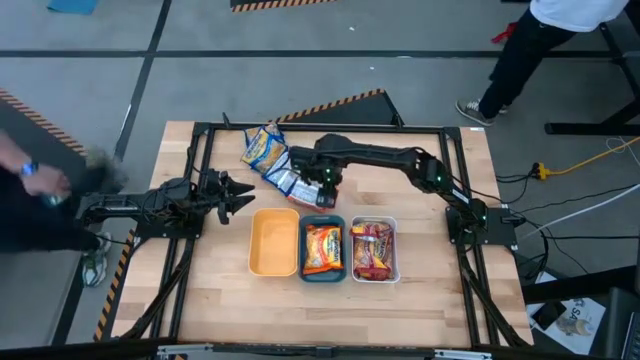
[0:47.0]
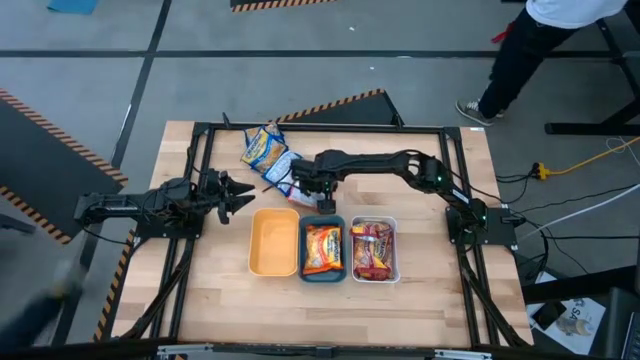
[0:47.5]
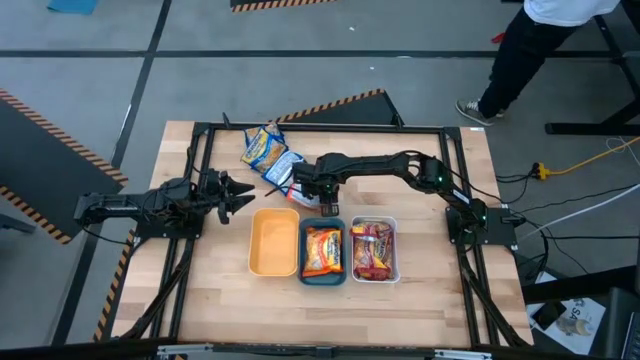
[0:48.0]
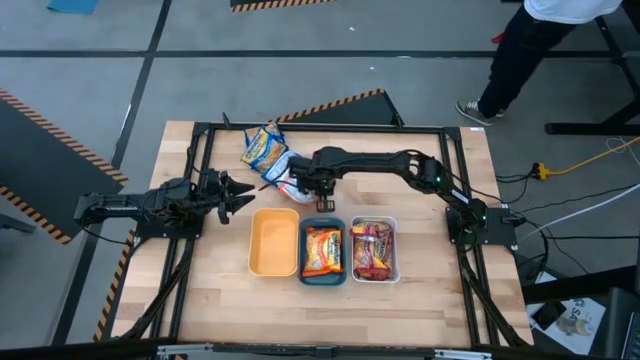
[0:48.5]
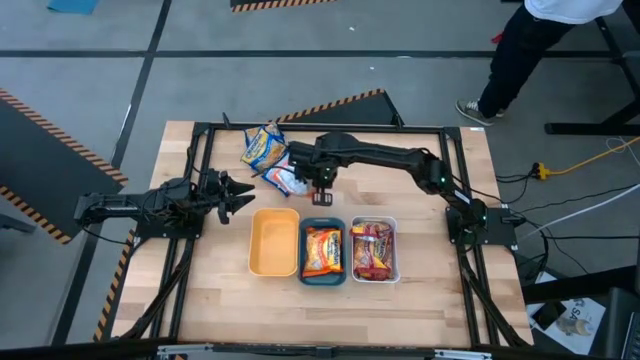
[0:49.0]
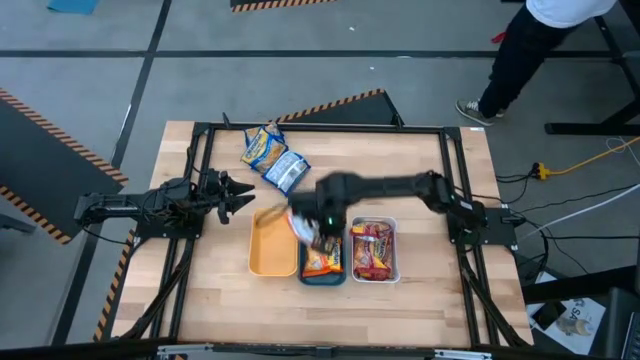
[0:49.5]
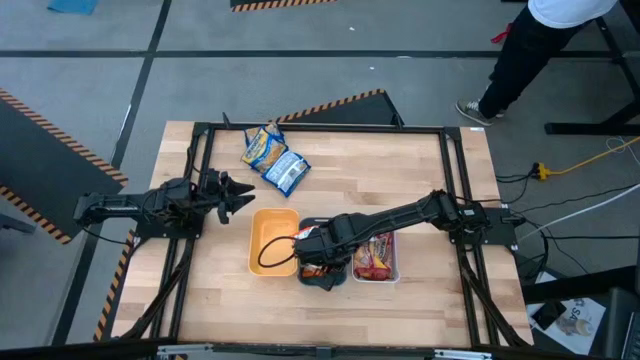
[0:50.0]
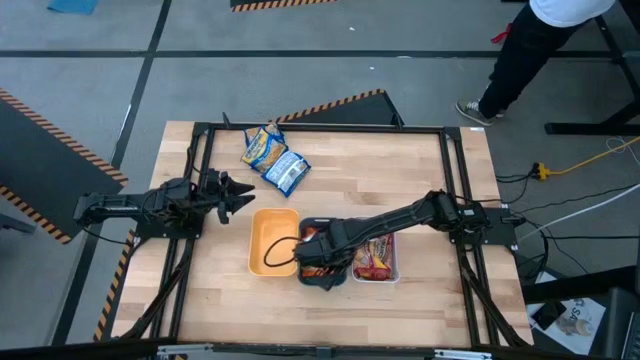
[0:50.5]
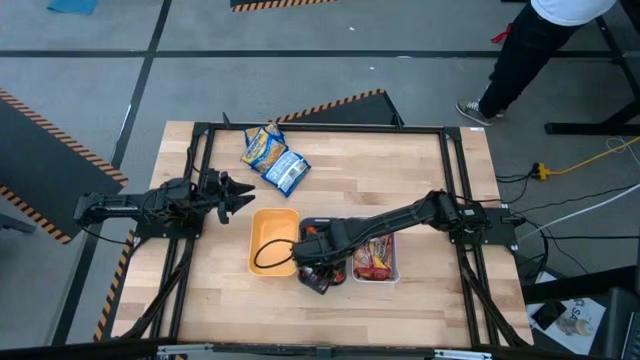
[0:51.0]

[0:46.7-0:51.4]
Task: Sort Maruchan noodles
Put the orange noodle pack into the blue bin

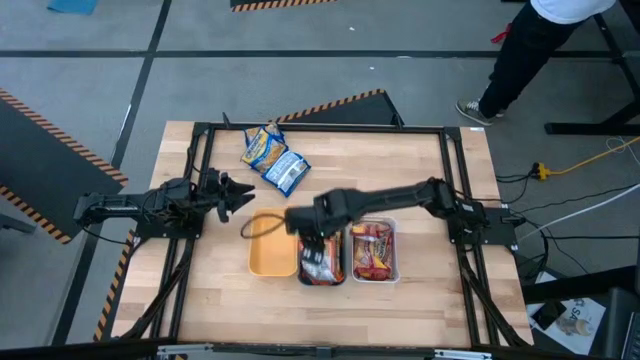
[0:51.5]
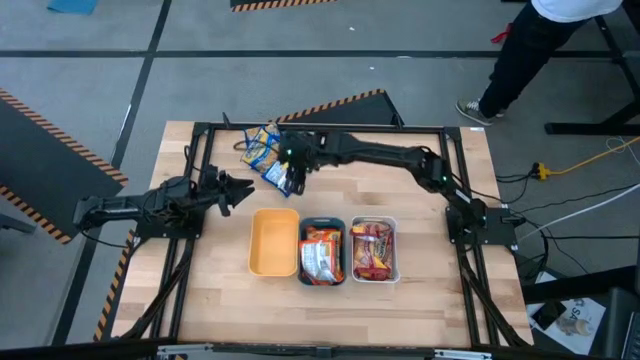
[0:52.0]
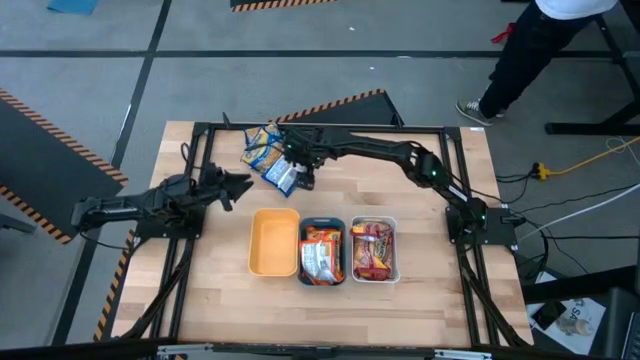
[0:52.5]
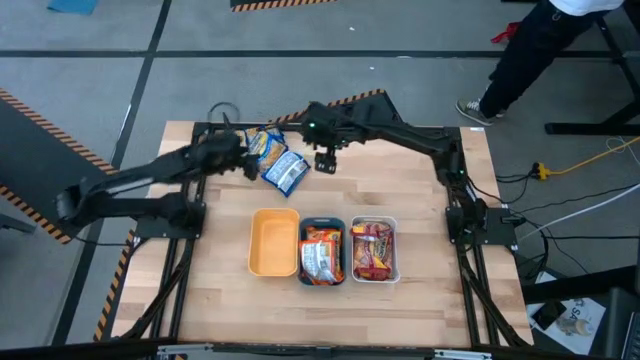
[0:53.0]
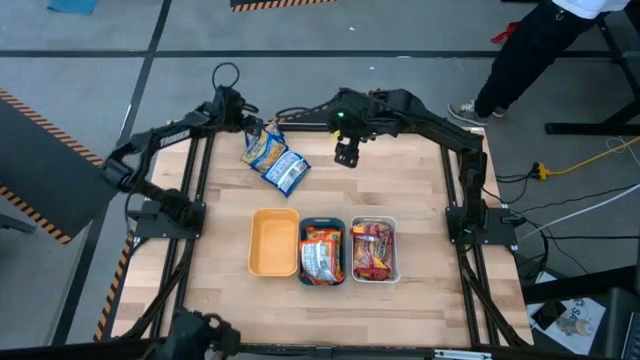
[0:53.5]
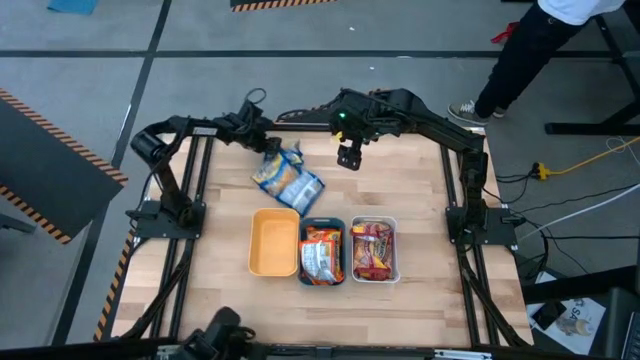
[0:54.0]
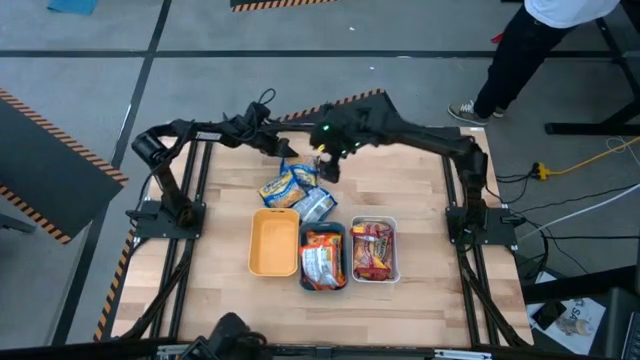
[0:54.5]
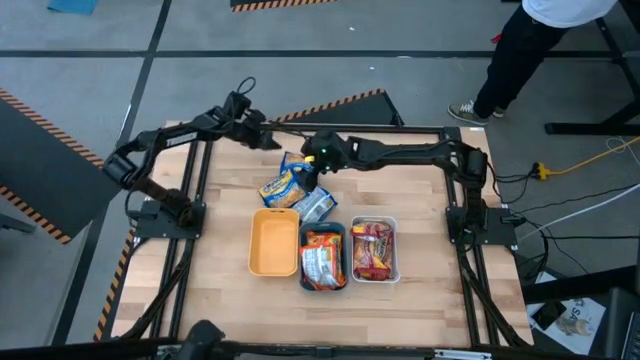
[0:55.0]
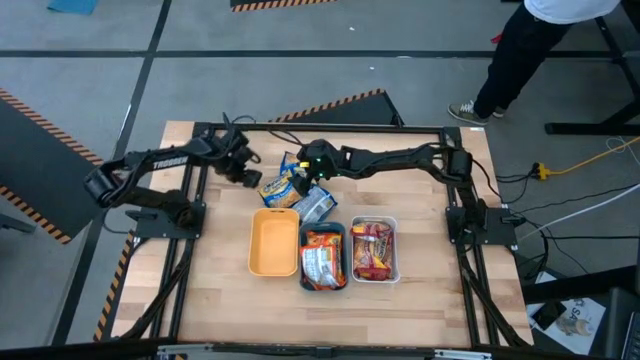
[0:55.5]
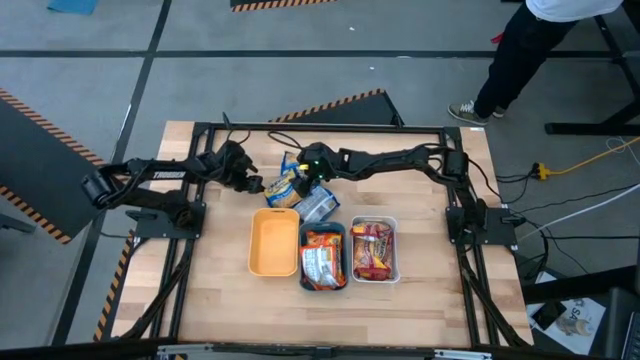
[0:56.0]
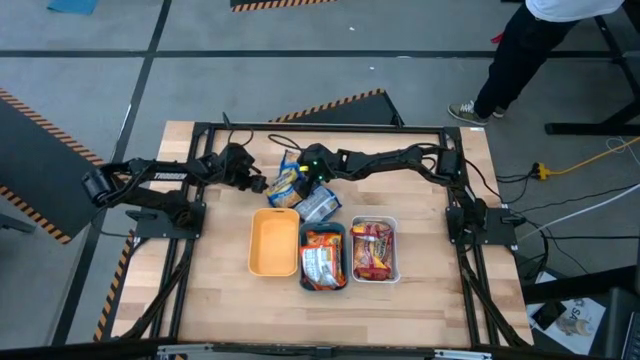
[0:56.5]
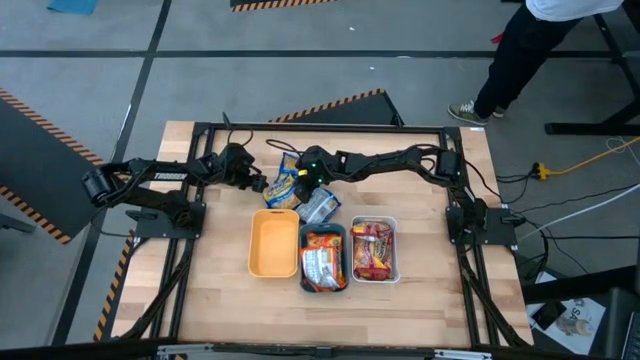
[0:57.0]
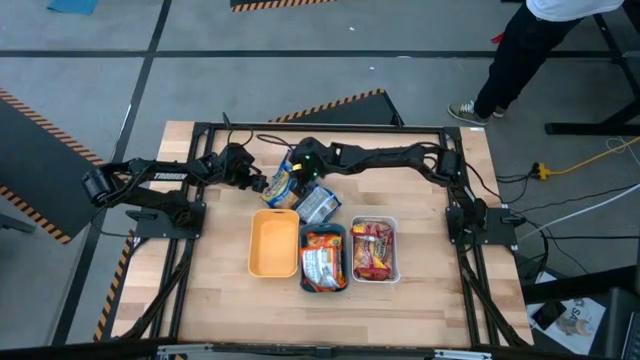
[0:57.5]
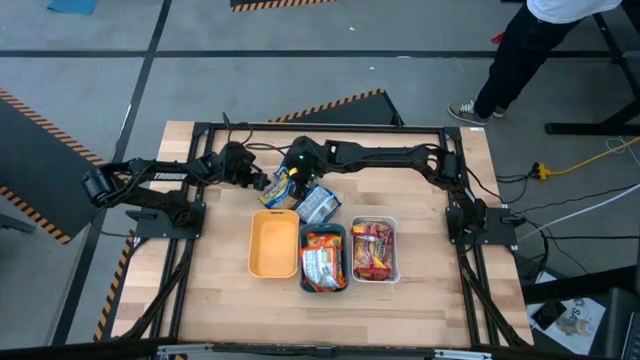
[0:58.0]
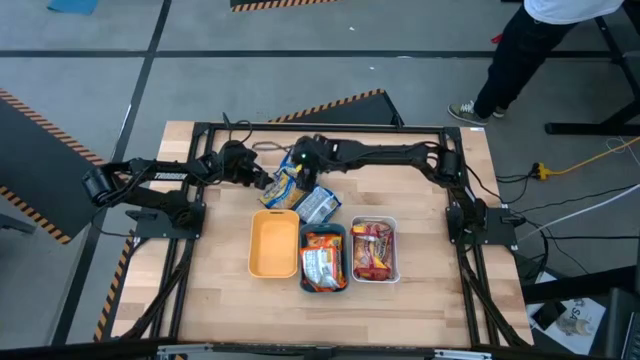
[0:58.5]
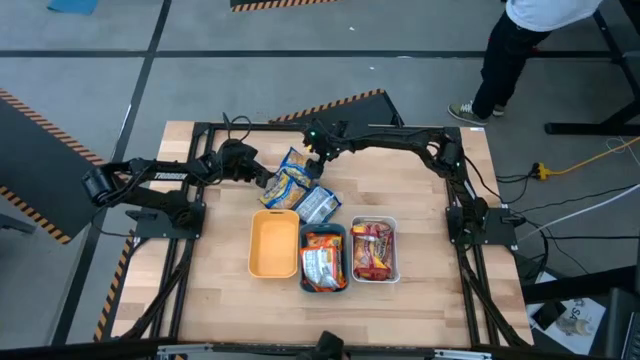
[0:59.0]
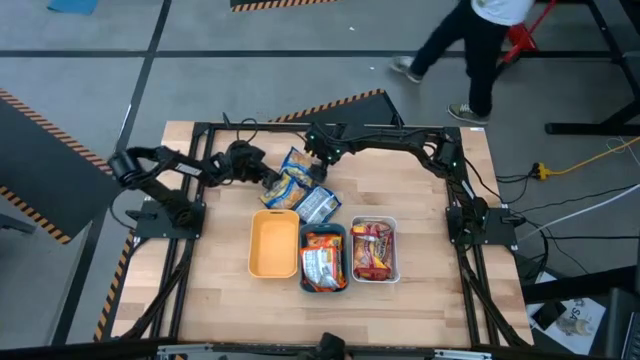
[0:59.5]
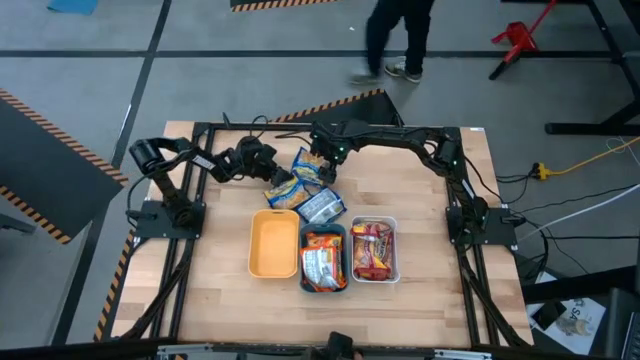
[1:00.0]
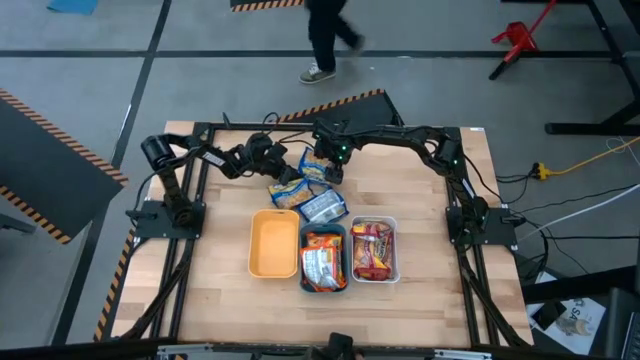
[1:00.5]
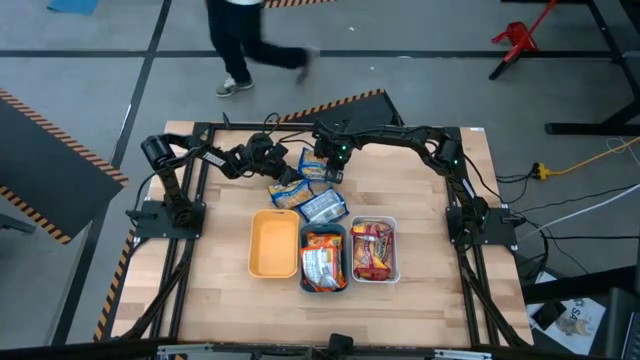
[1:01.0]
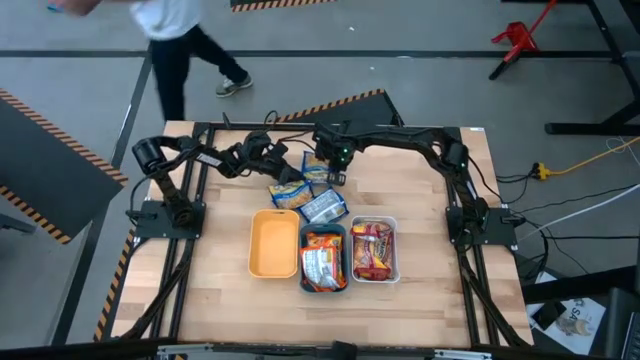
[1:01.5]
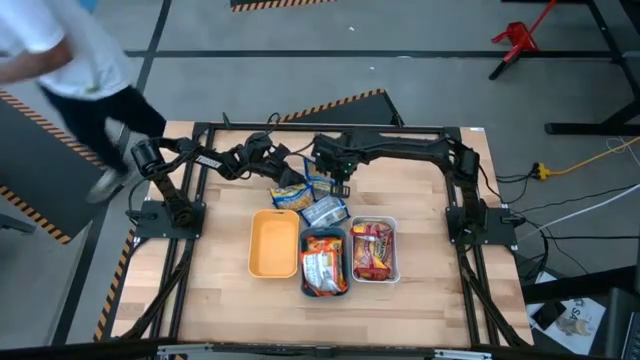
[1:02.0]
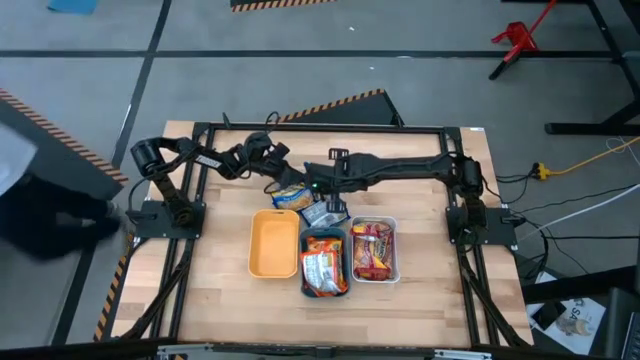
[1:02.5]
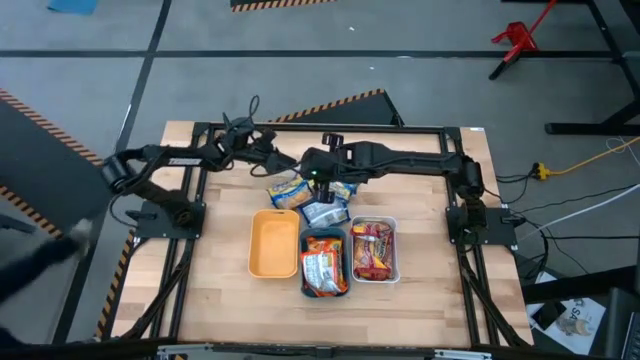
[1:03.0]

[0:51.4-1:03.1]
Put the top blue noodle pack into the yellow bin

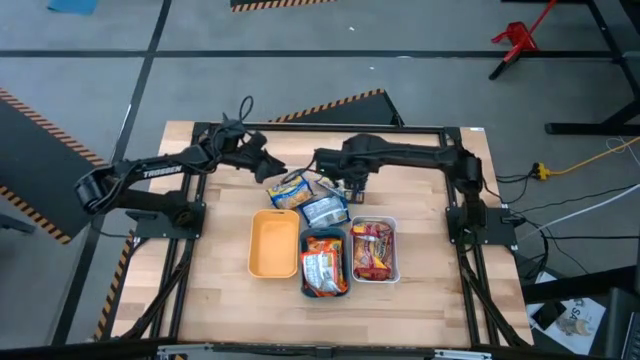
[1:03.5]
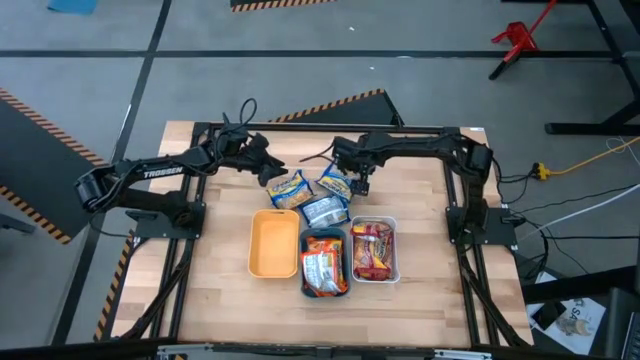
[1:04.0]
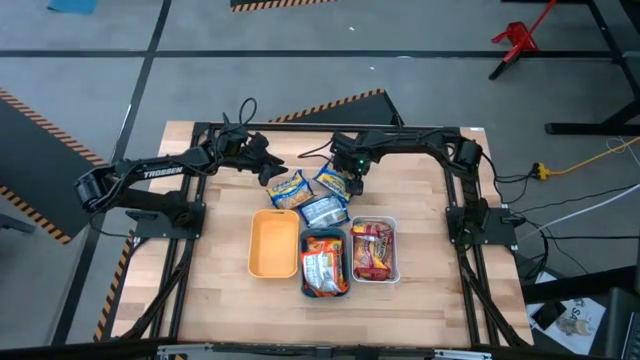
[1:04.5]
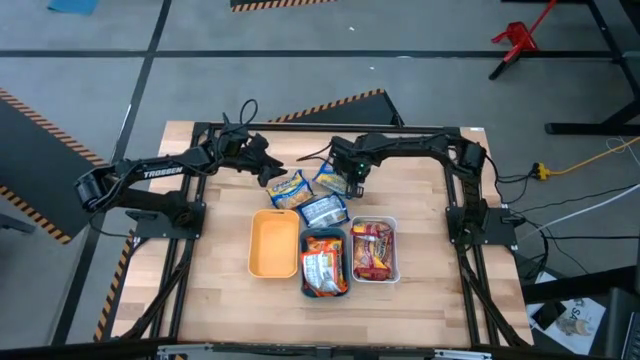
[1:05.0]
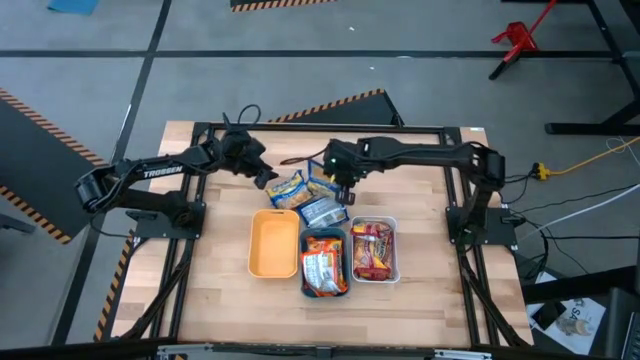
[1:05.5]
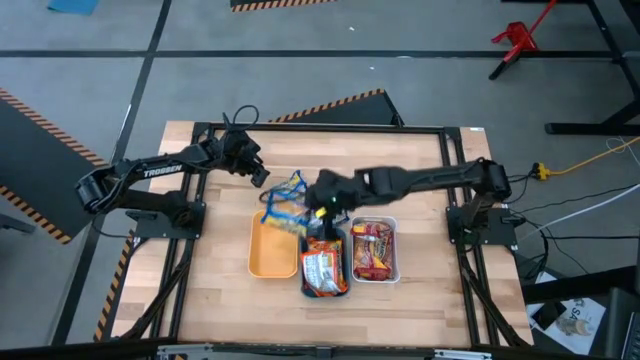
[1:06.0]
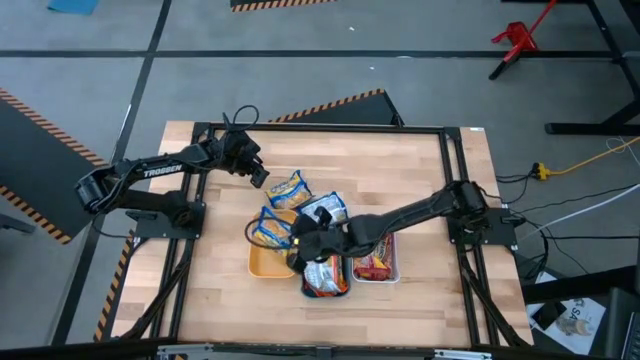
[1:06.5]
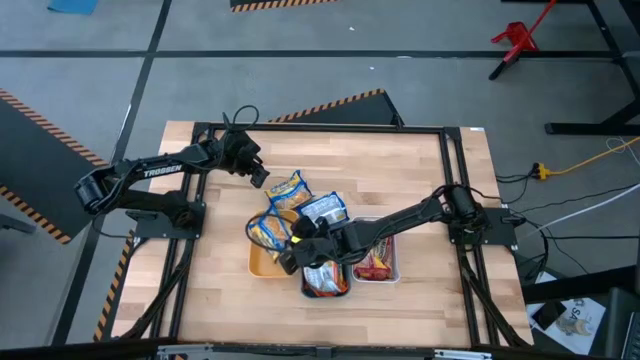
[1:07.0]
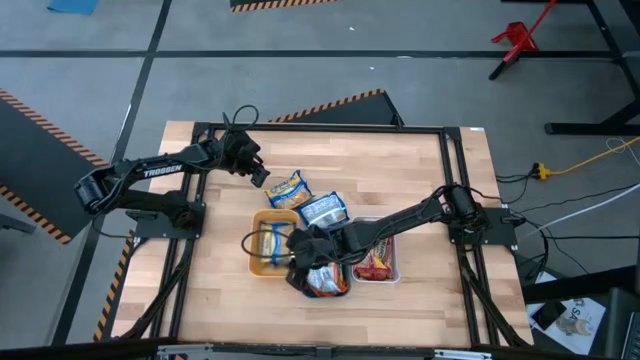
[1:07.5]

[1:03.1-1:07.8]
Put the top blue noodle pack into the yellow bin

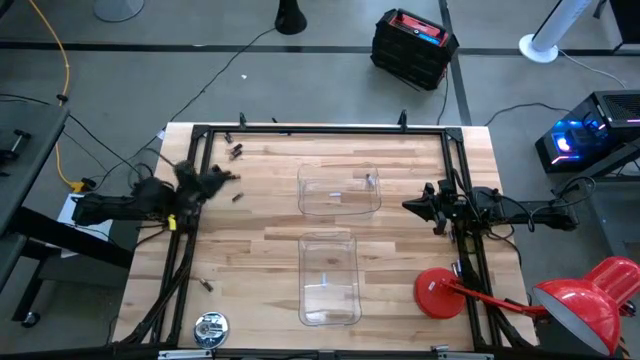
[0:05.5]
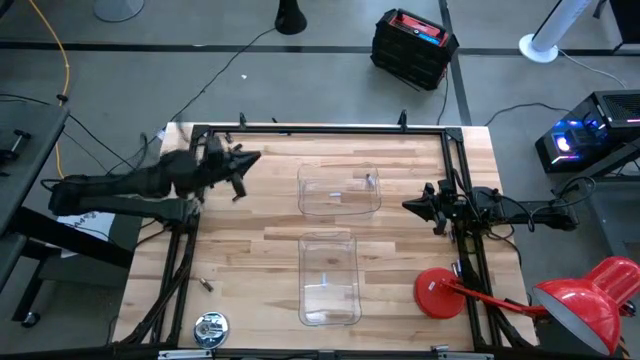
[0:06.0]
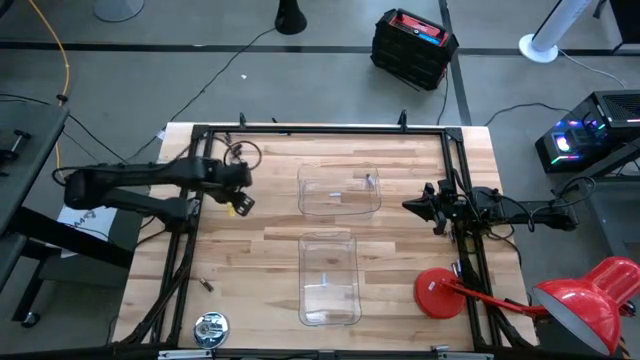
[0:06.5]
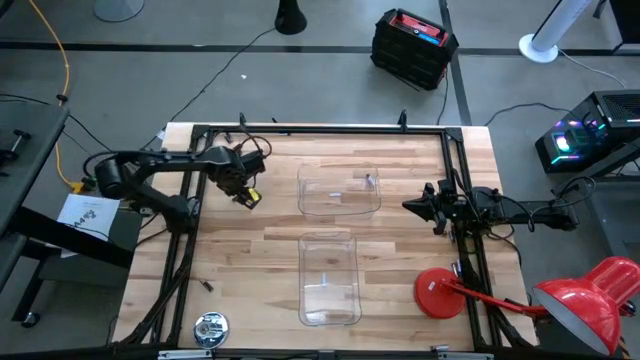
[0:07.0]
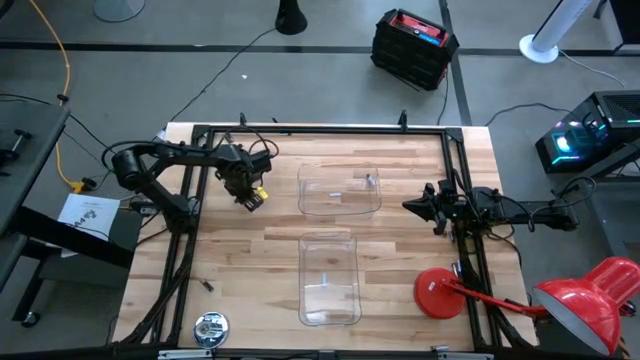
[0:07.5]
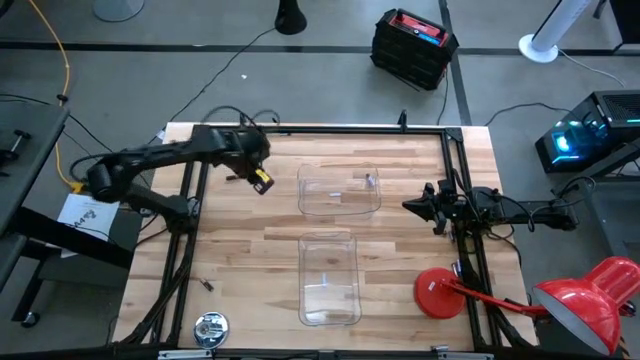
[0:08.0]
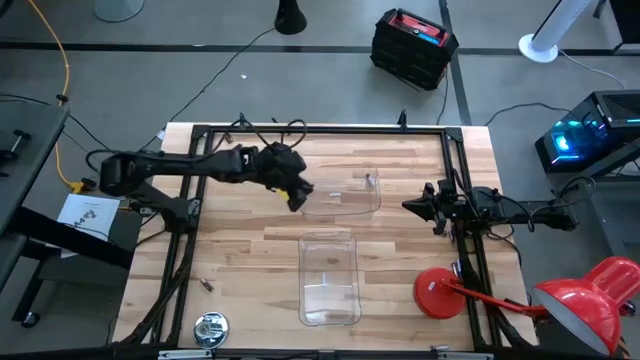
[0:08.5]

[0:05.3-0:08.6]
Task: Sort batteries
Put the black battery into the top transparent bin
